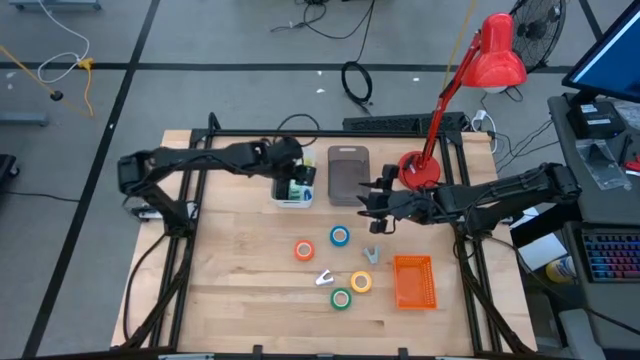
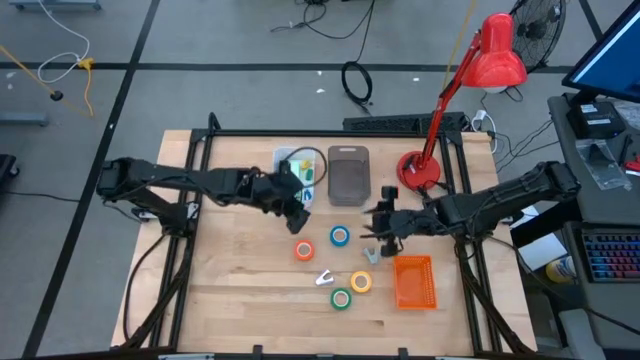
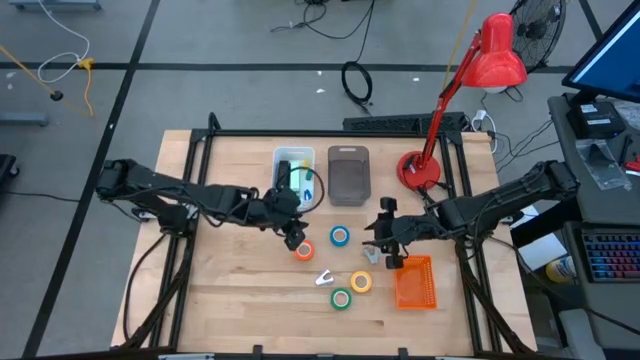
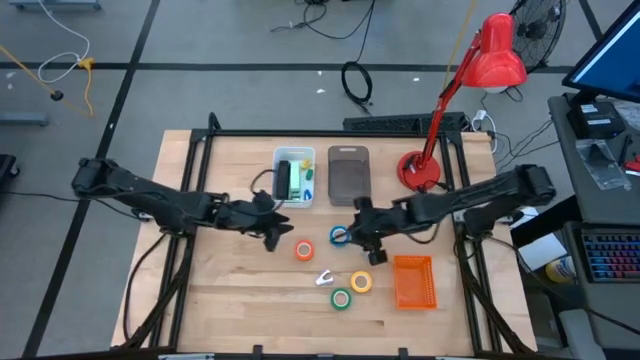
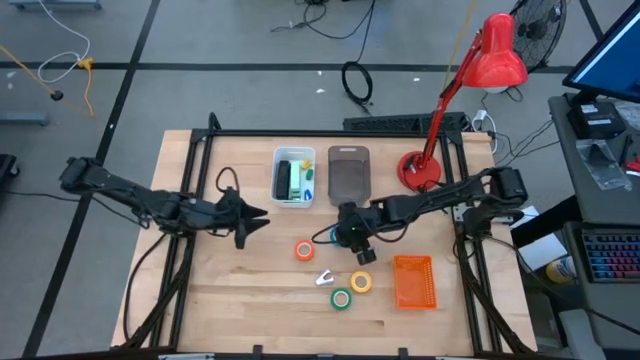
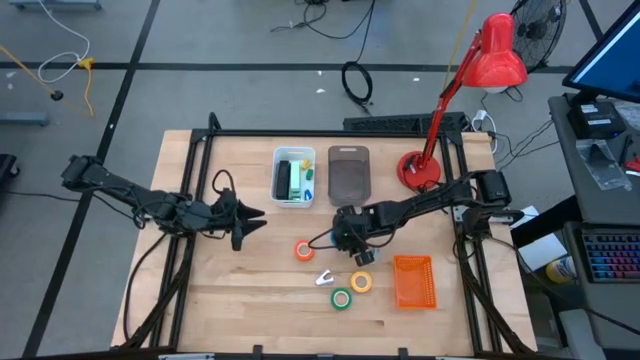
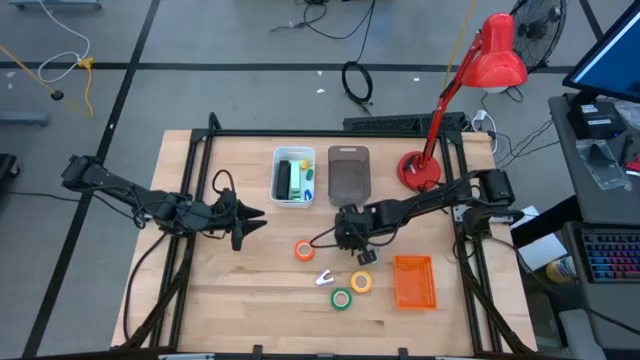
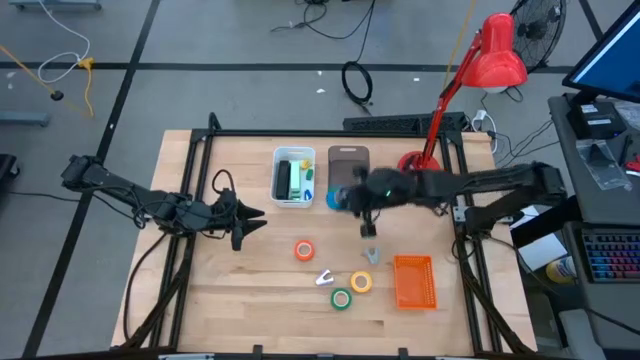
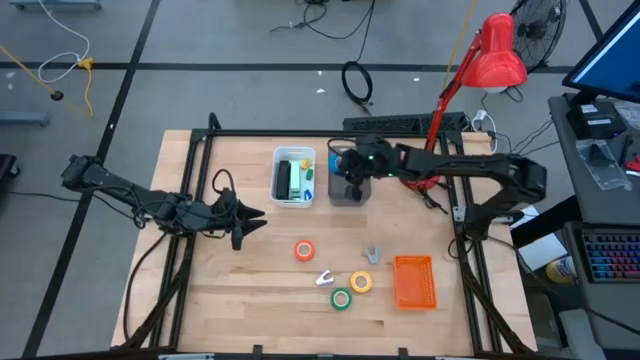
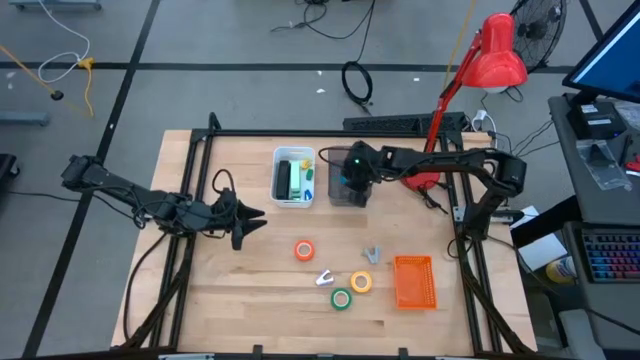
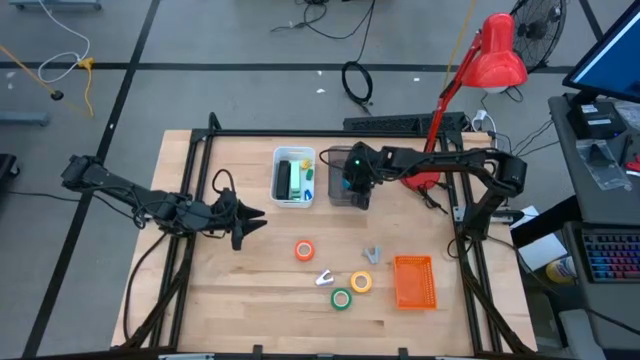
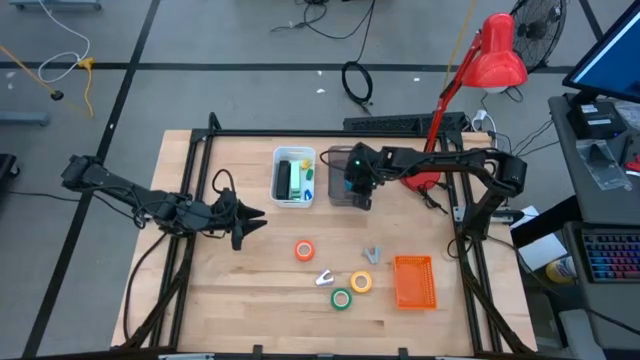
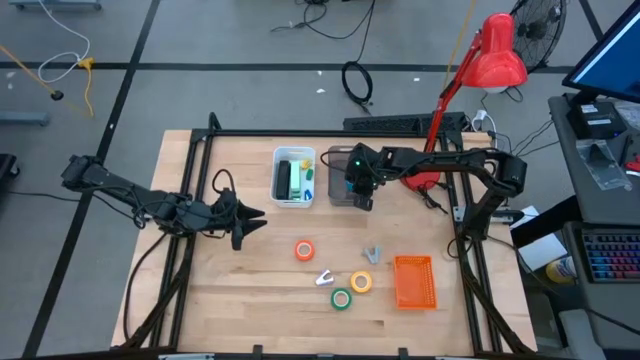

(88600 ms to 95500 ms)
Task: Pick and place Stapler, Stapler remover, tape
Put the blue tape into the black bin

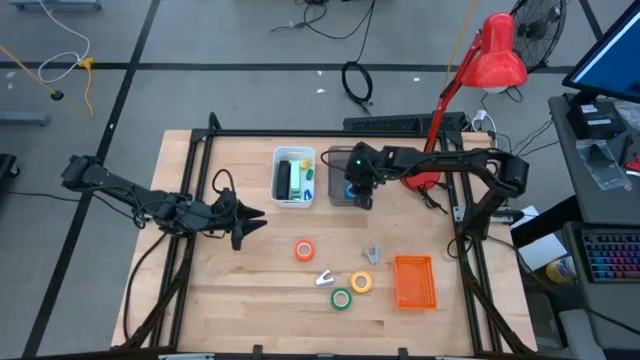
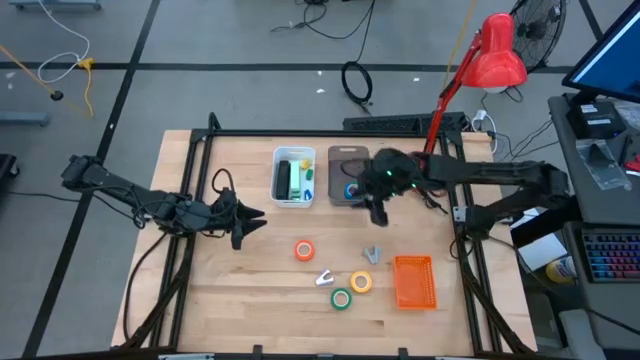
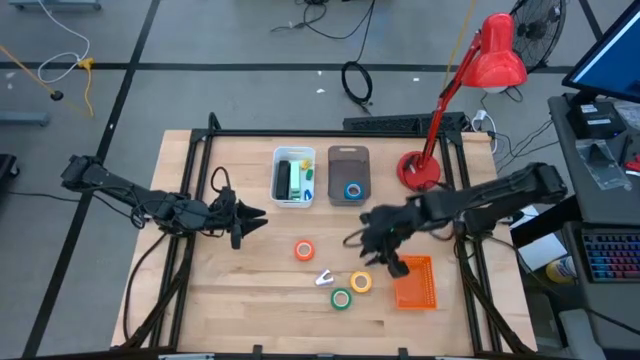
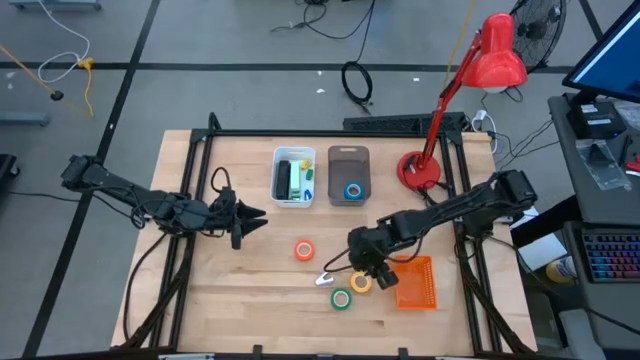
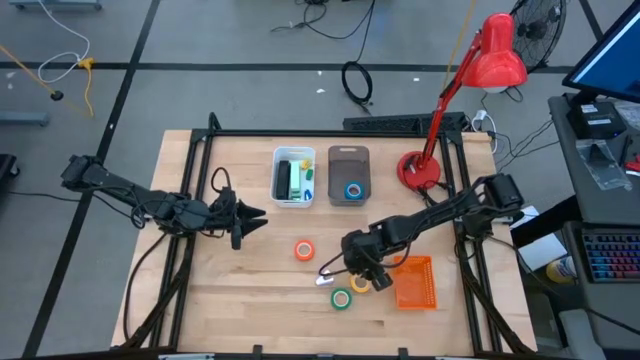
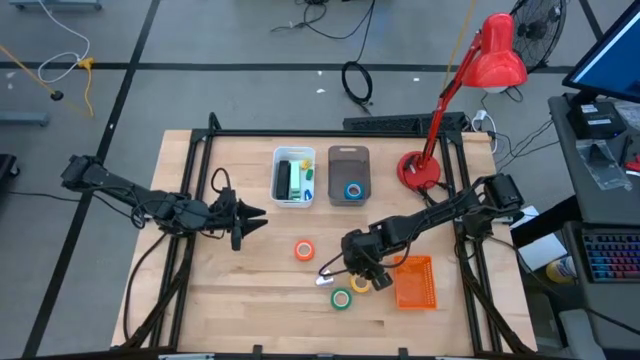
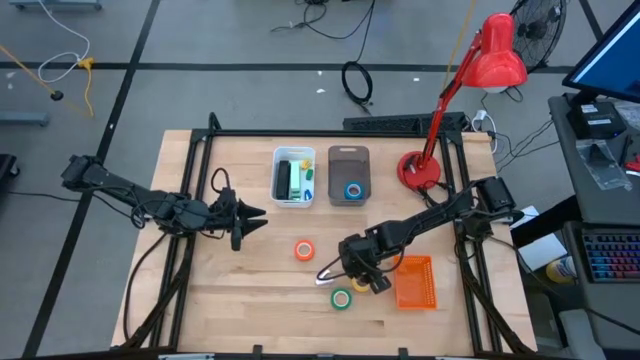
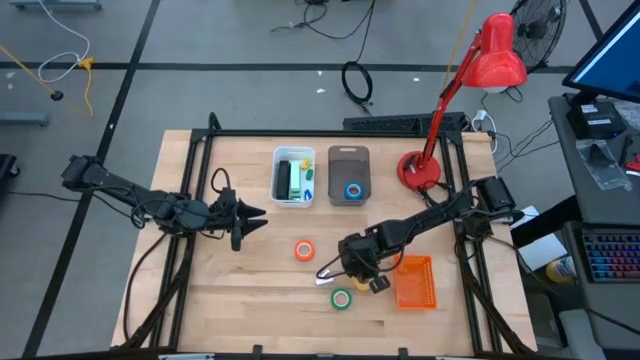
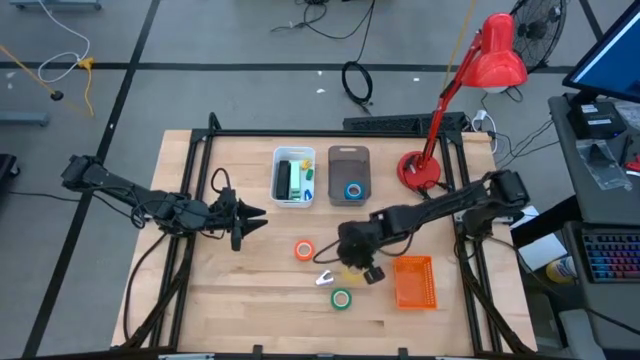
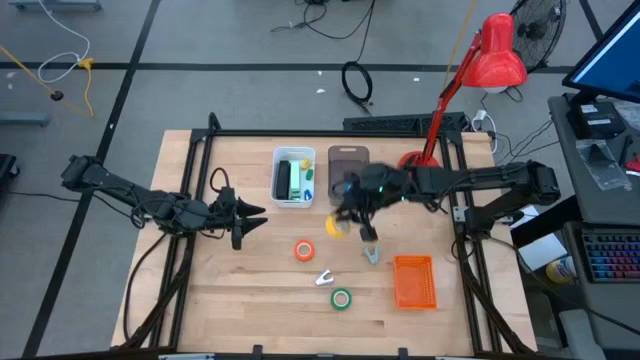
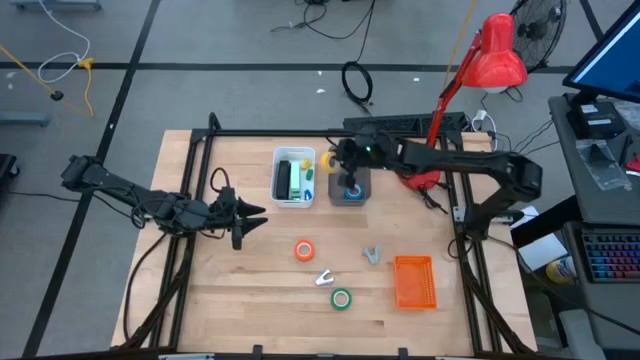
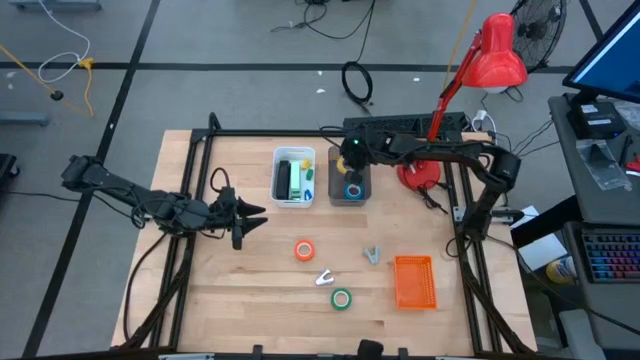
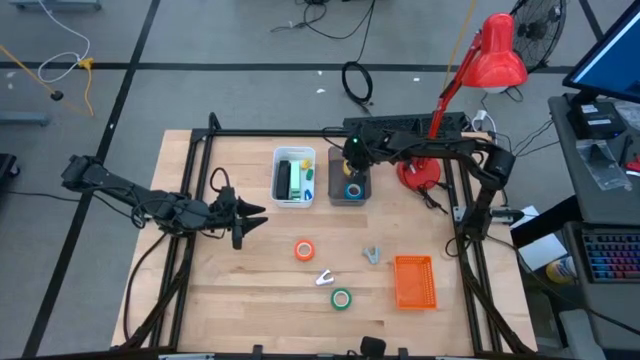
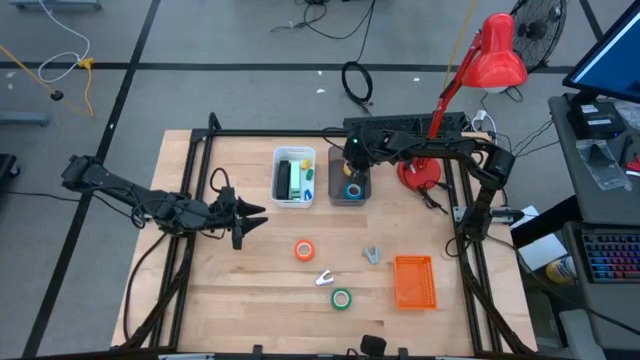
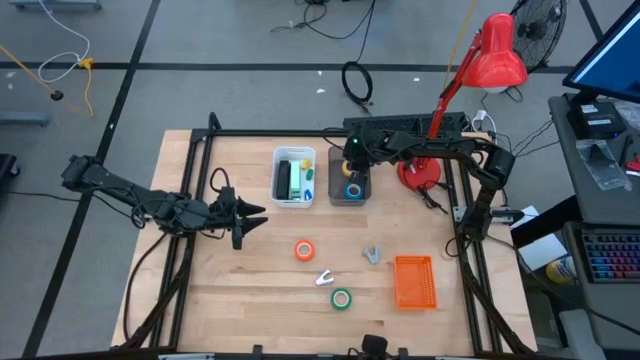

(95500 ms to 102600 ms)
Put the yellow tape into the black bin

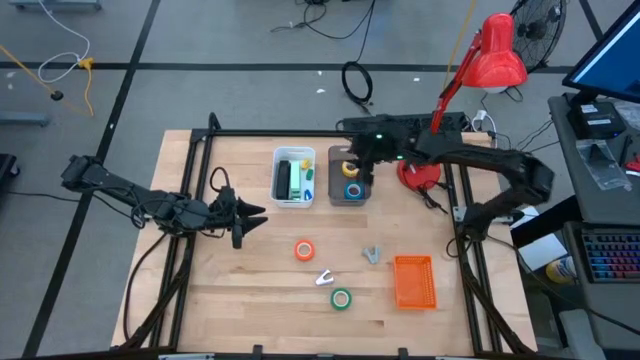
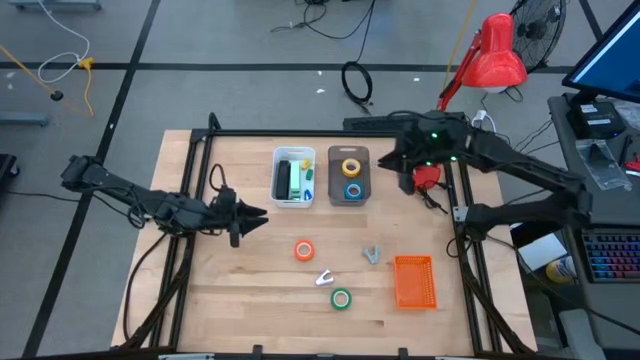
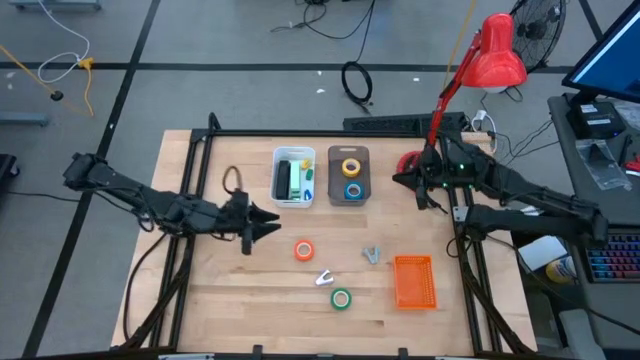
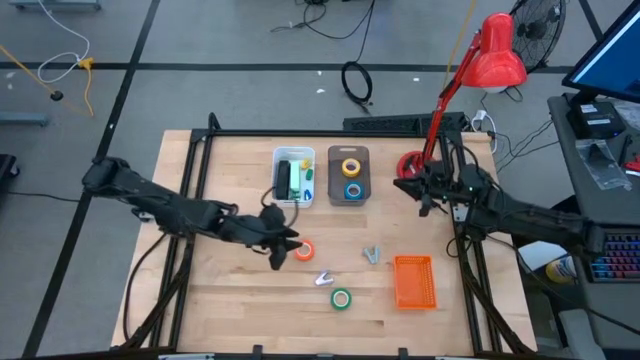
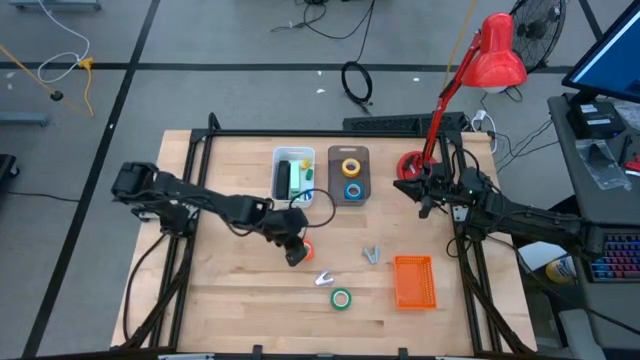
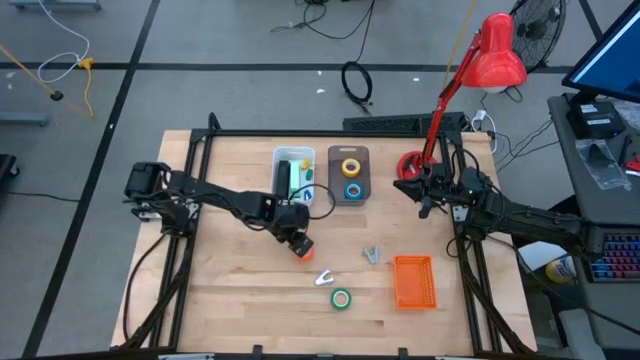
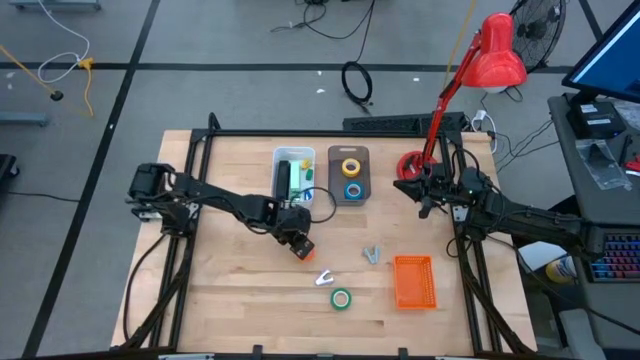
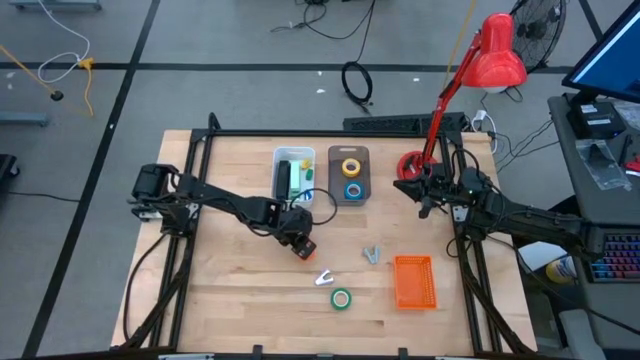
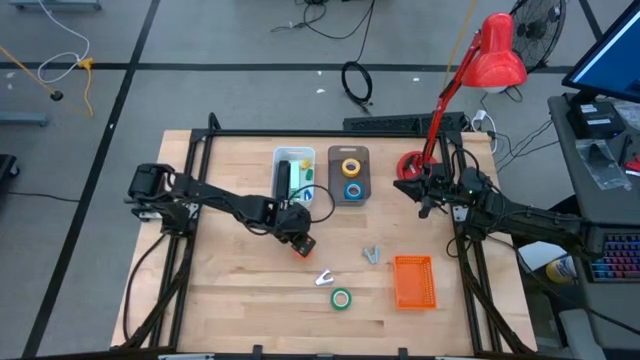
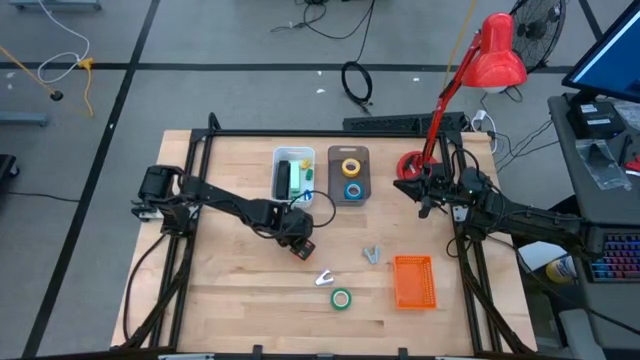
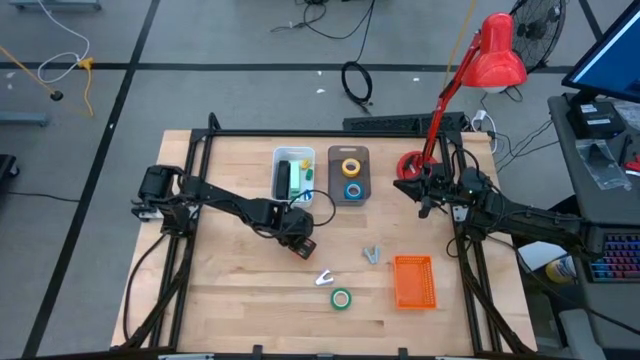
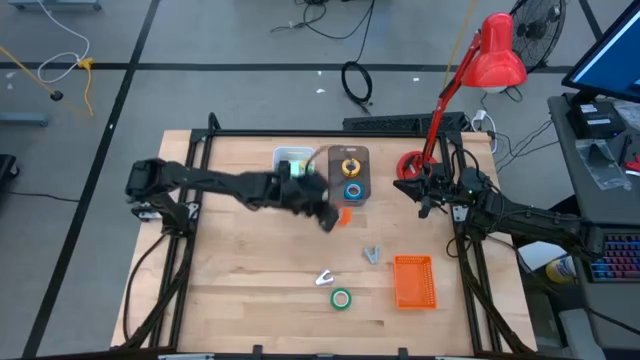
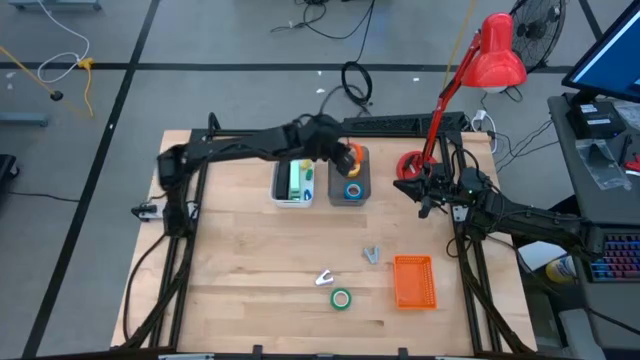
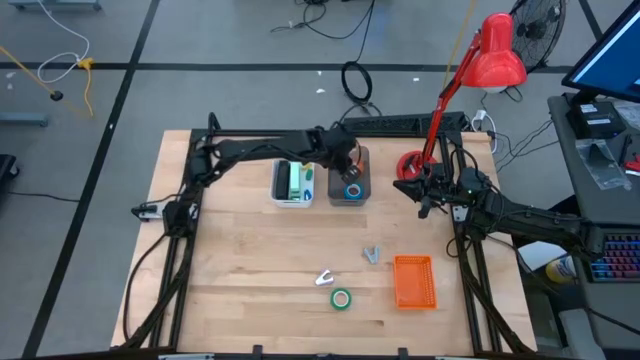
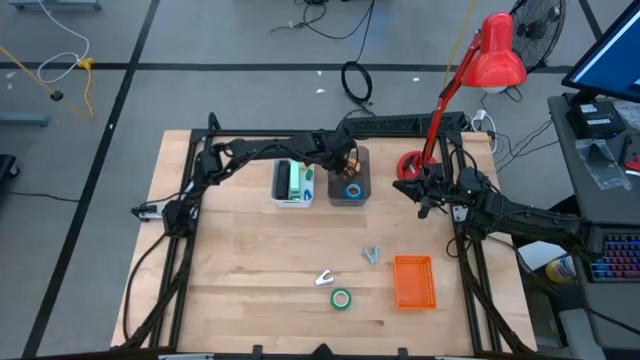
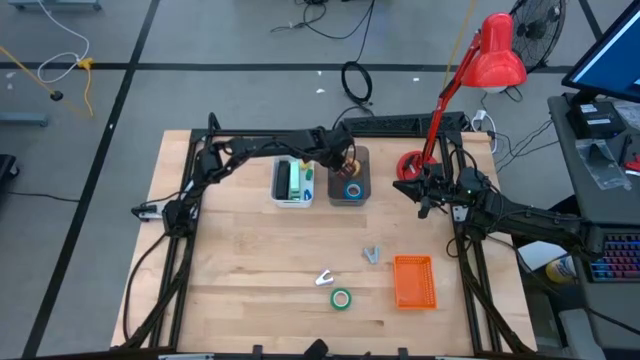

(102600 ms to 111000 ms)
Put the orange tape into the black bin

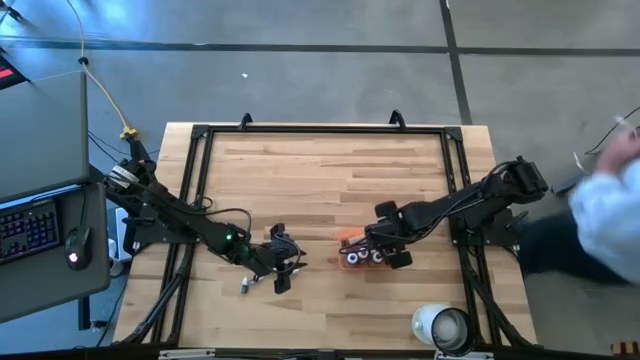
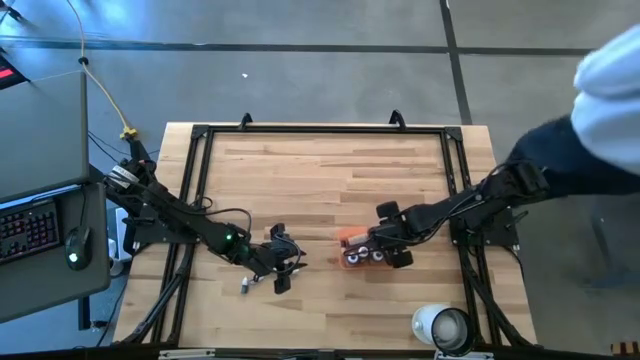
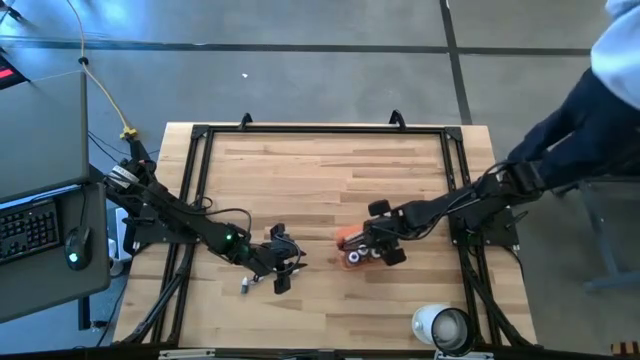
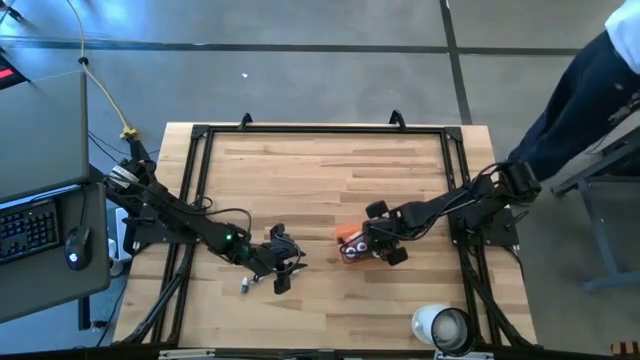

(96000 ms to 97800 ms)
Task: Pick & Place food coloring
Adjust the large pink food coloring bottle in the orange bin
